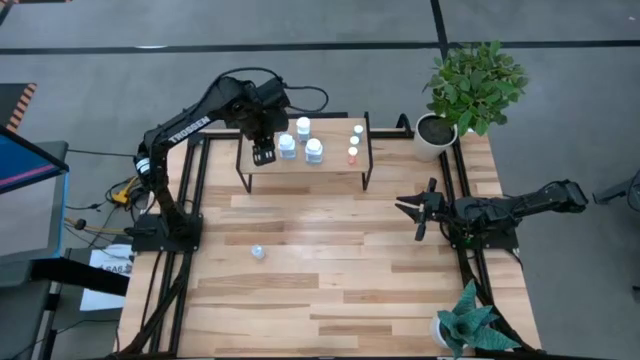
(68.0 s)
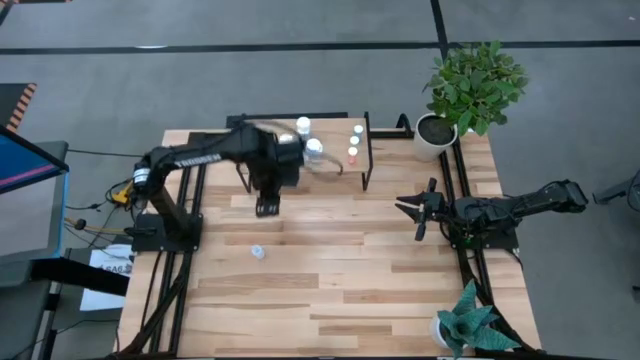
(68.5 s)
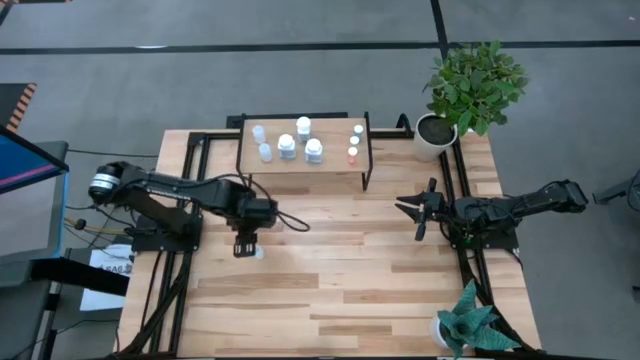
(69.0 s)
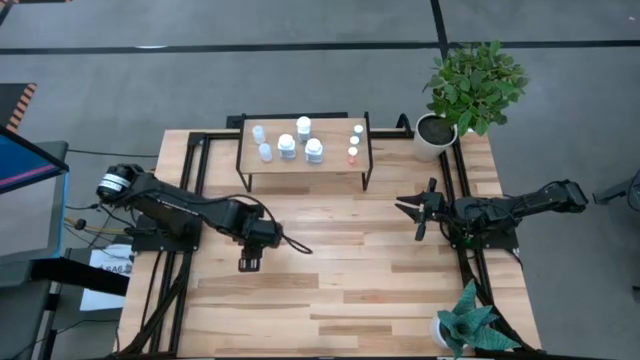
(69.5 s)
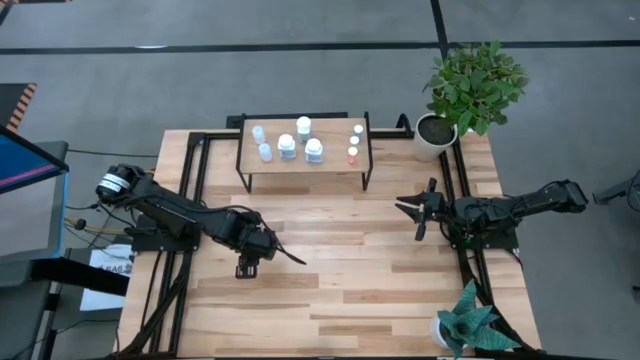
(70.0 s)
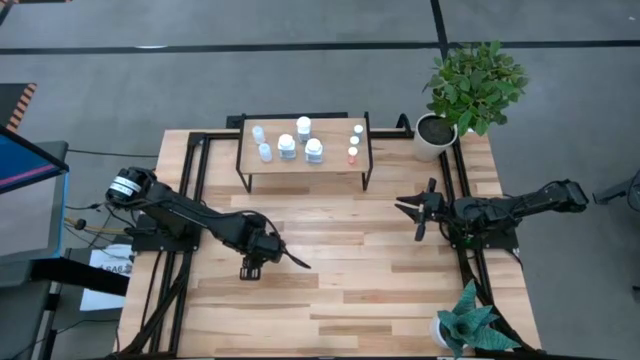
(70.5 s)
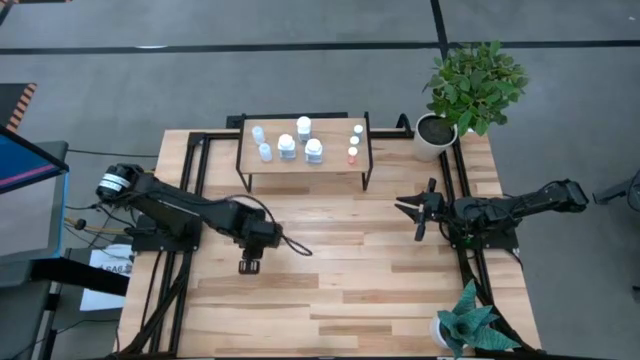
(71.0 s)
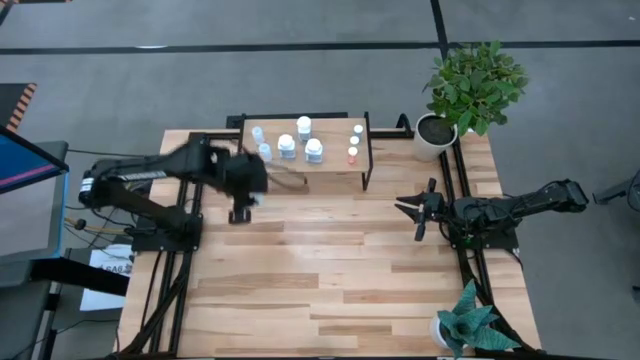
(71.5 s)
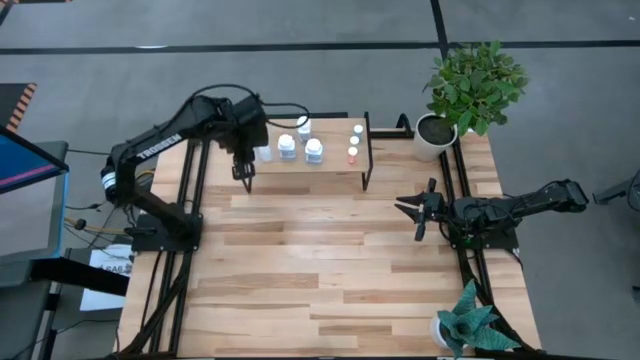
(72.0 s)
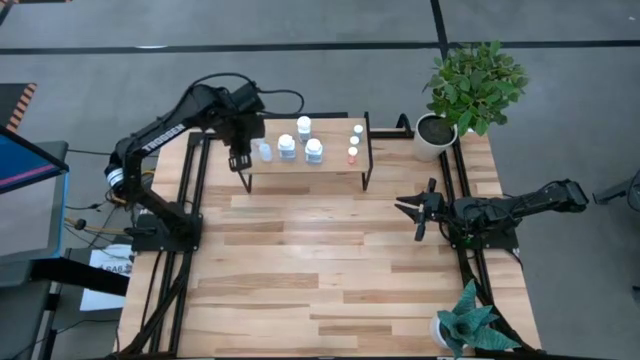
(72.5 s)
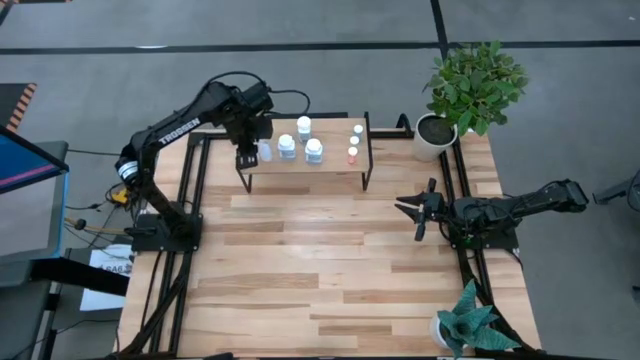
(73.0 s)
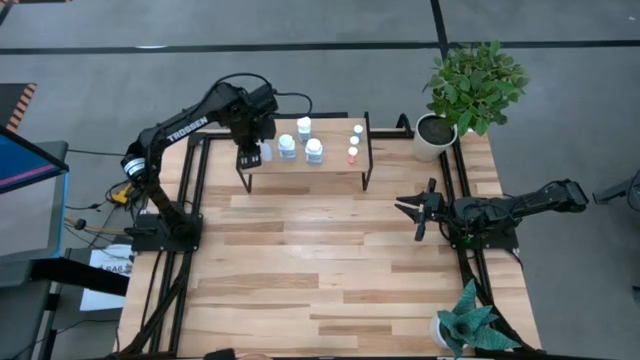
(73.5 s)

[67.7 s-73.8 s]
Task: Pick and place medicine bottles onto shelf by color
Put the transparent pill bottle on the shelf

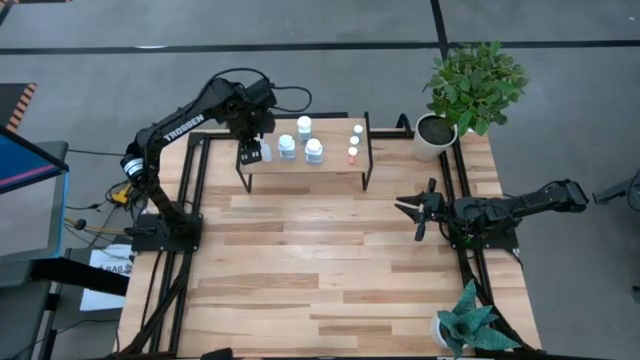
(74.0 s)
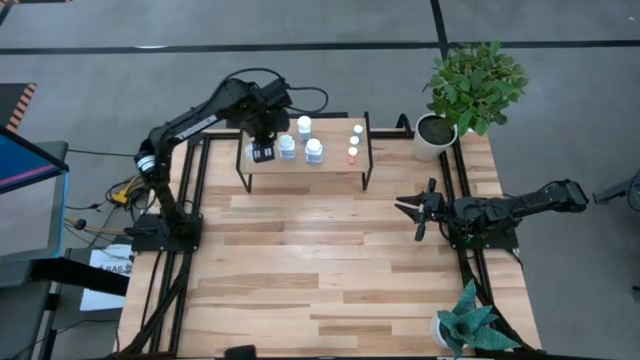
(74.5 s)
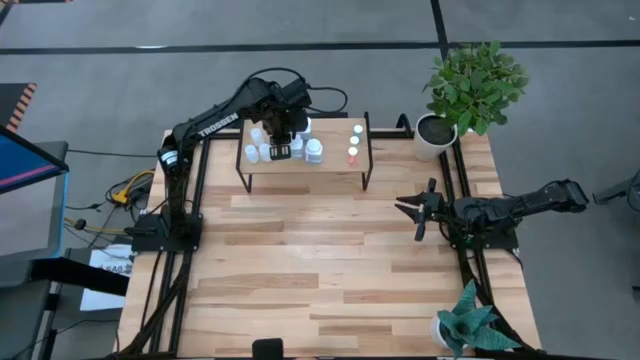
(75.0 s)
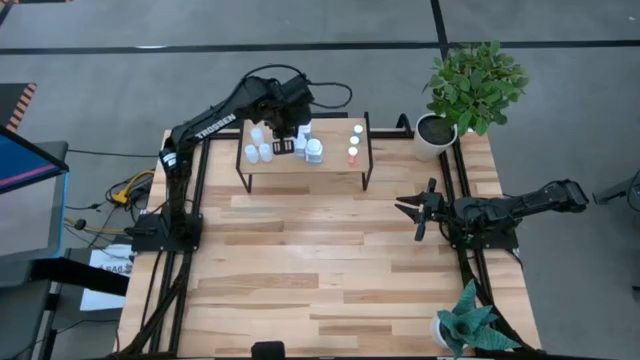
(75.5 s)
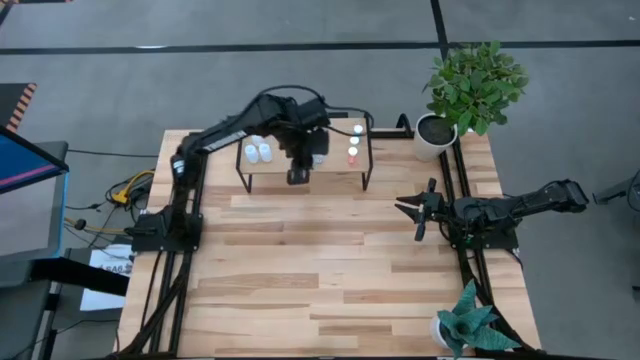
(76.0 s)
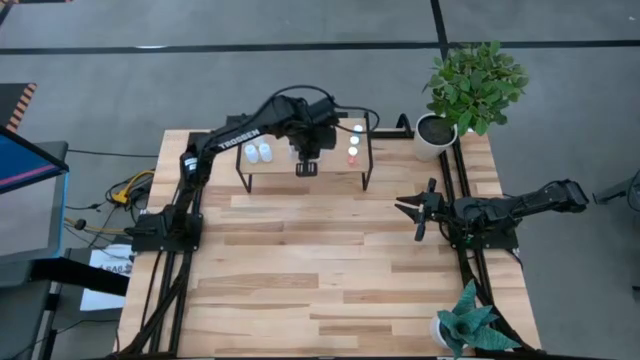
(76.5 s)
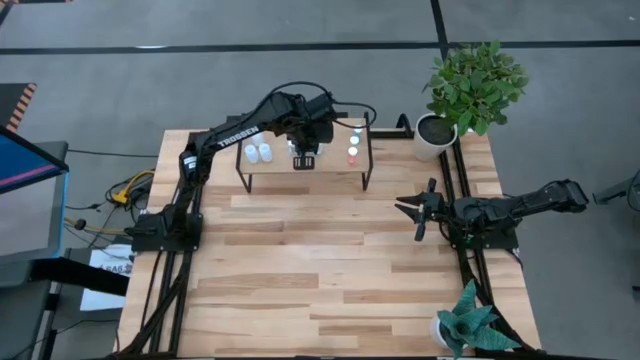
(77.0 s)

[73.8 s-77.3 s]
Adjust the white pill bottles on the shelf

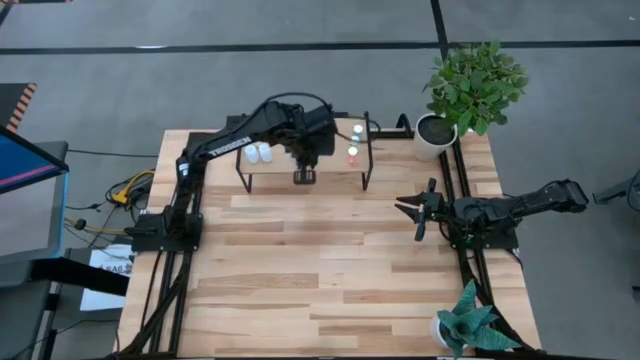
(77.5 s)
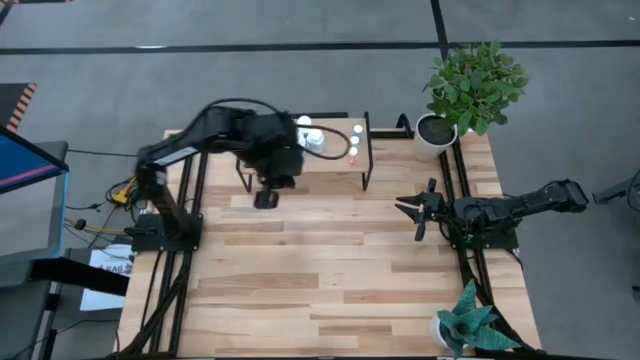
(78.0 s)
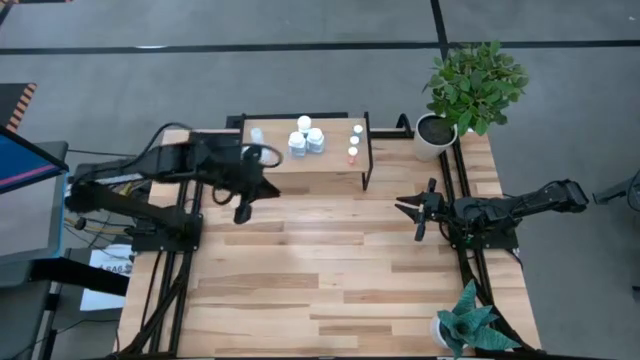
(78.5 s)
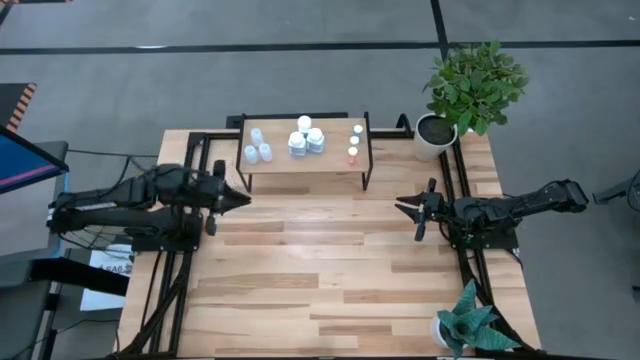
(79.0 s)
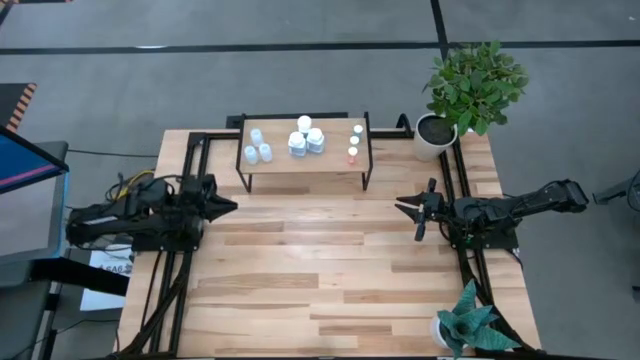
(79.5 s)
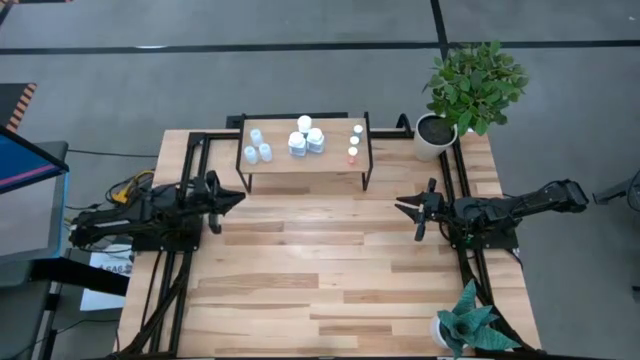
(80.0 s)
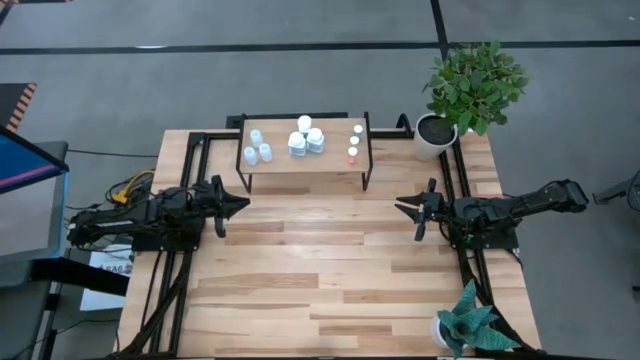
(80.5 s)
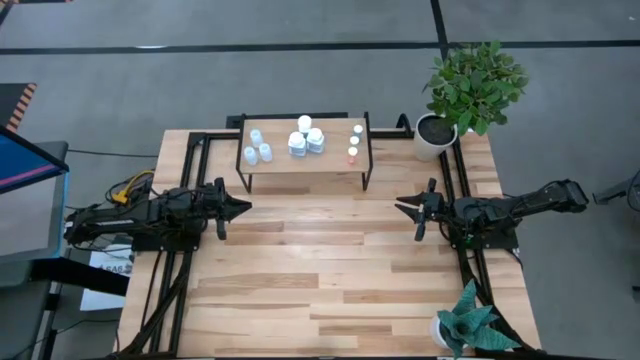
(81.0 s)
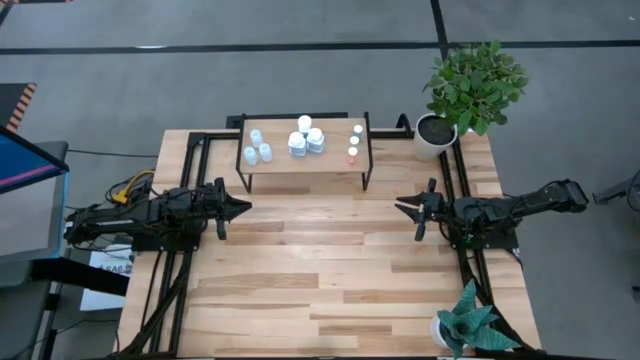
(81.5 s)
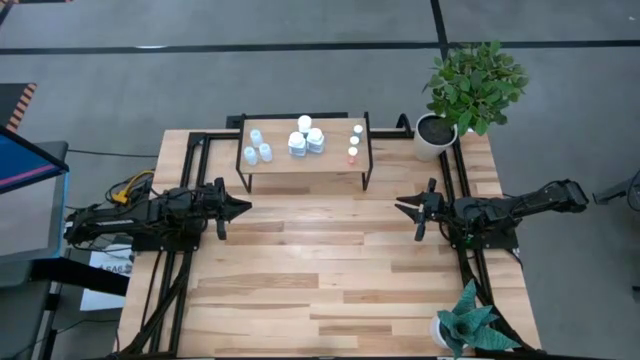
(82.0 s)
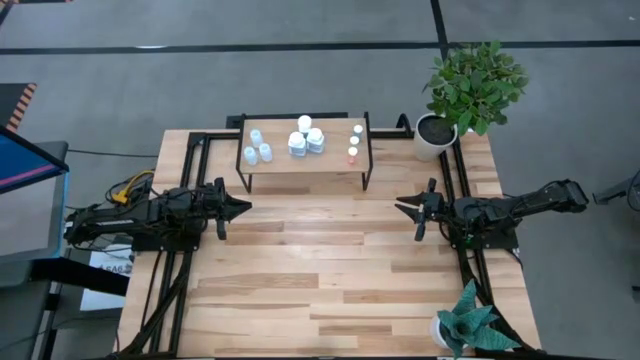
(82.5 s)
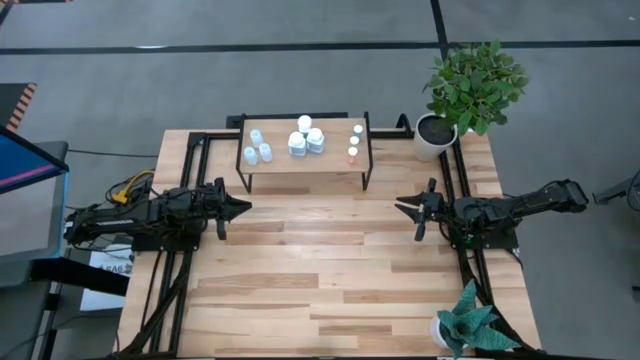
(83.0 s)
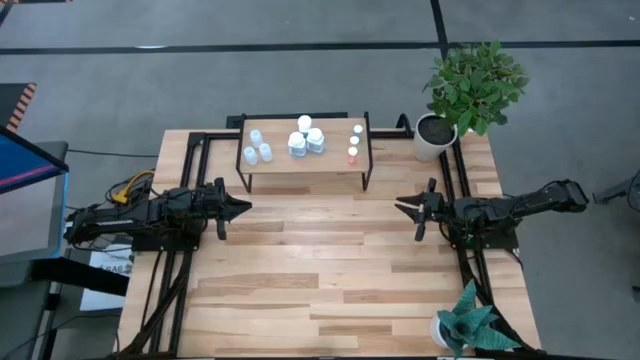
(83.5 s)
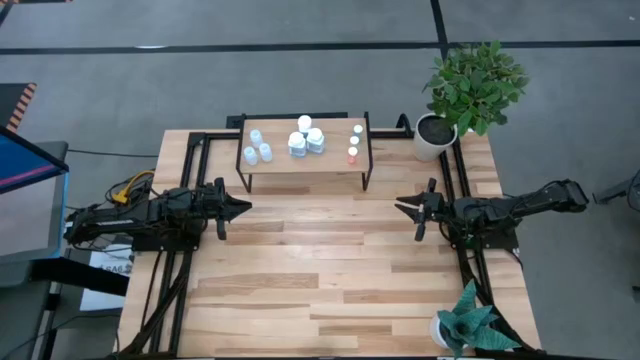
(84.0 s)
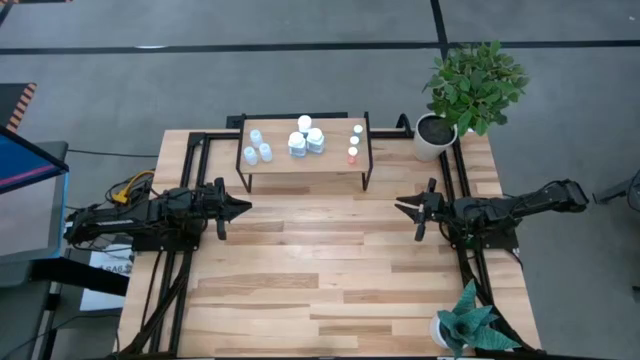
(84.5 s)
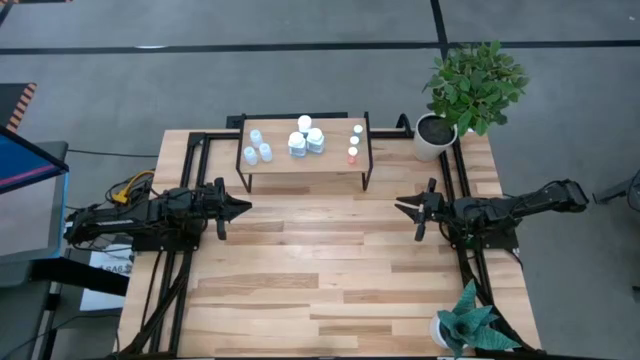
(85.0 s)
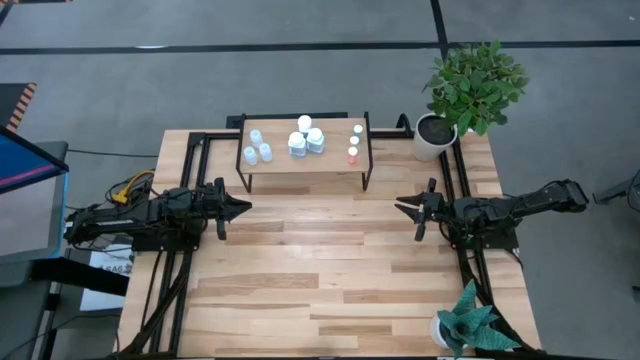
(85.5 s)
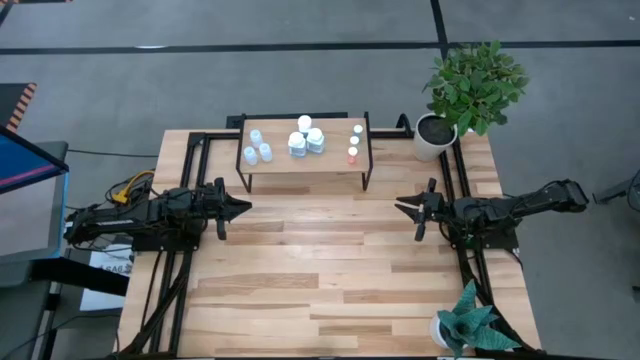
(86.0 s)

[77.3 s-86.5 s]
Return to Home Position

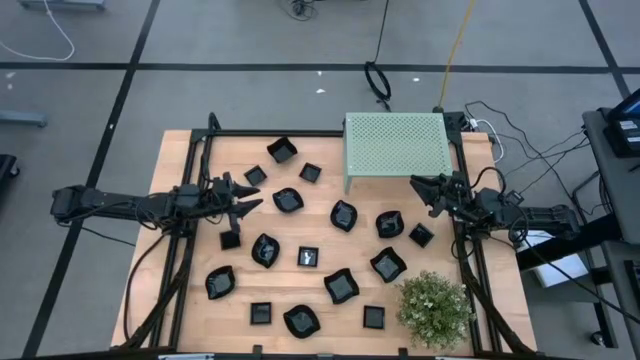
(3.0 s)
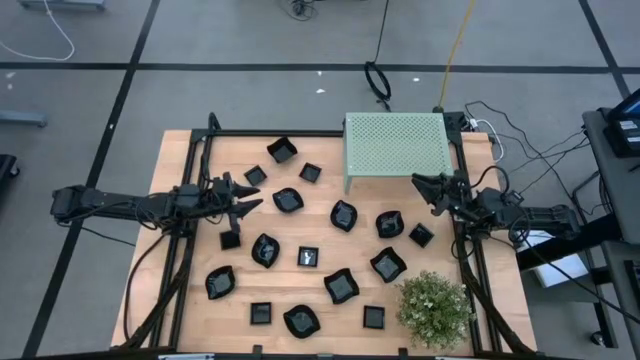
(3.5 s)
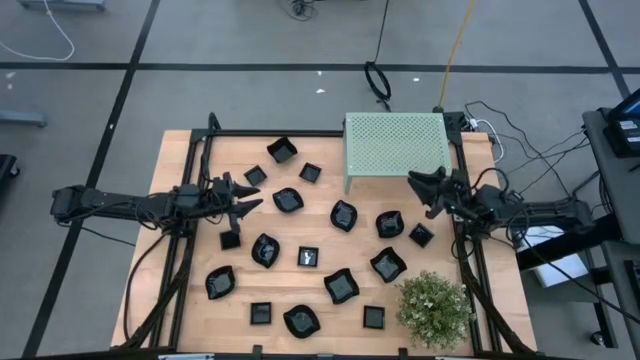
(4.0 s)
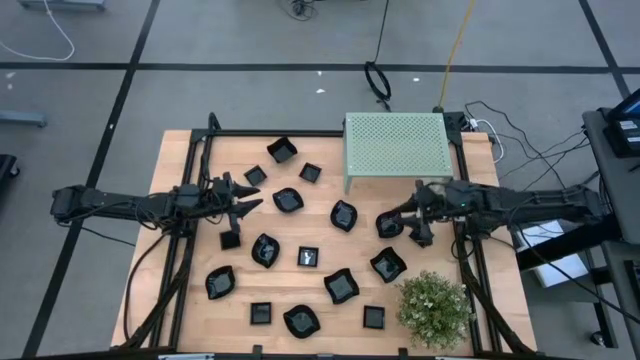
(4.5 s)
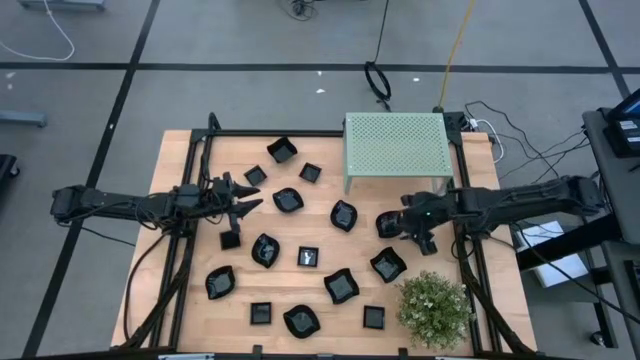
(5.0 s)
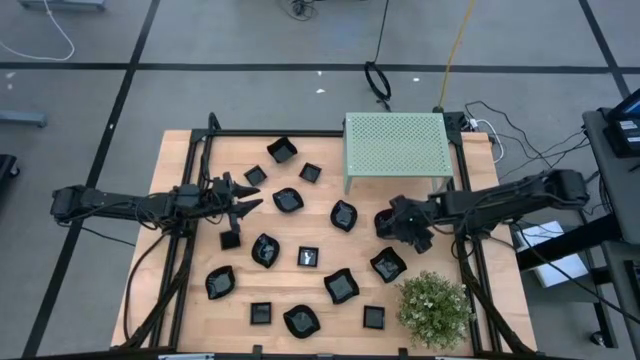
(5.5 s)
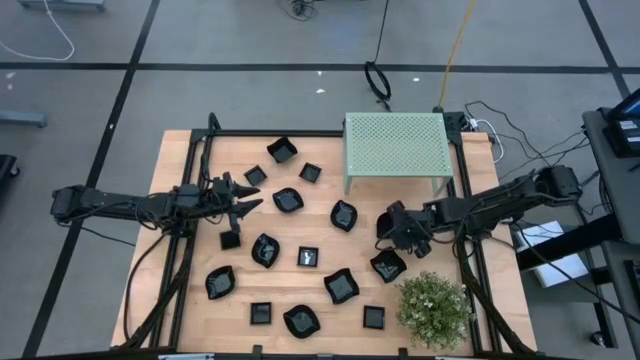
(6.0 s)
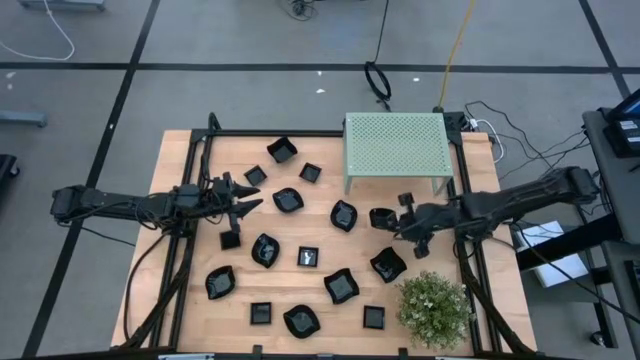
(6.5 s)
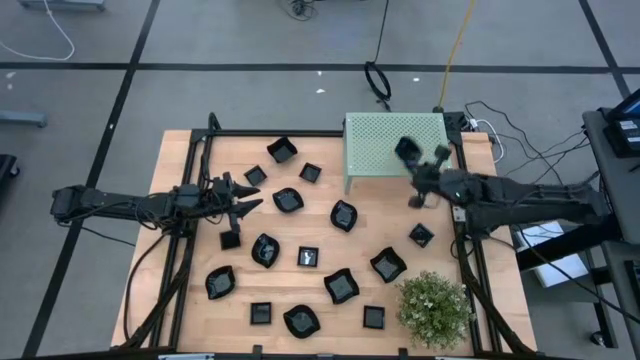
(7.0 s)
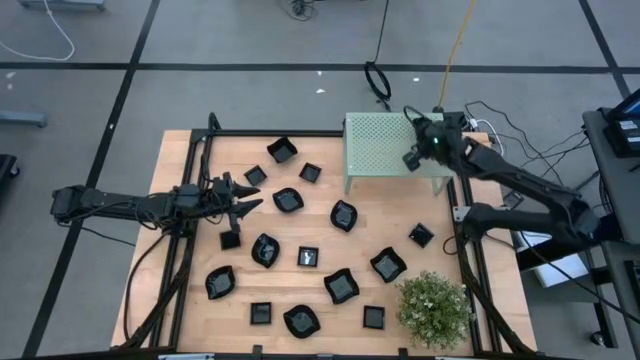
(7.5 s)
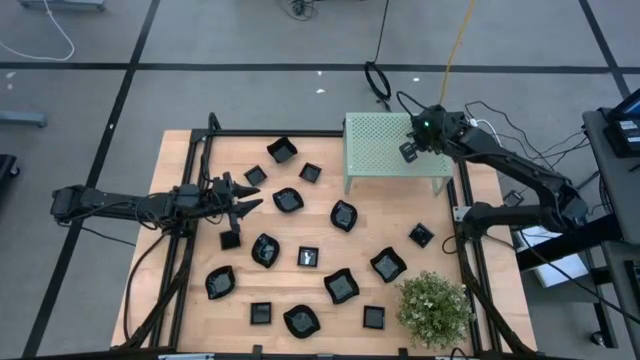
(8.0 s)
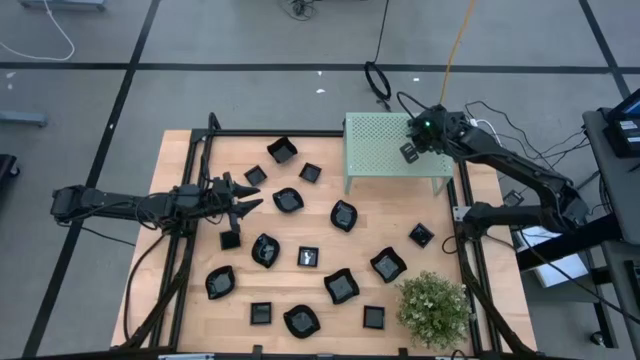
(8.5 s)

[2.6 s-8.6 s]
Task: Pick & Place Mini shaped plates
Put the black leaf-shaped plate on the shelf
